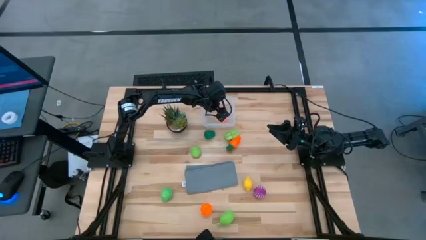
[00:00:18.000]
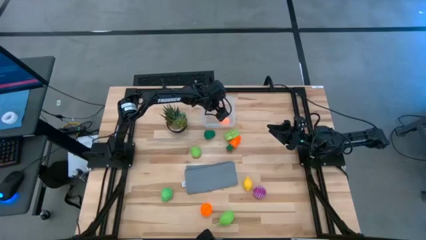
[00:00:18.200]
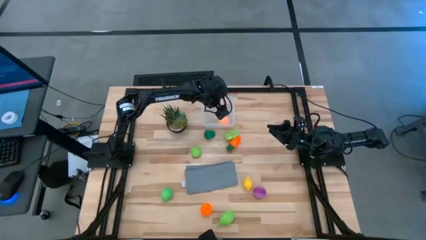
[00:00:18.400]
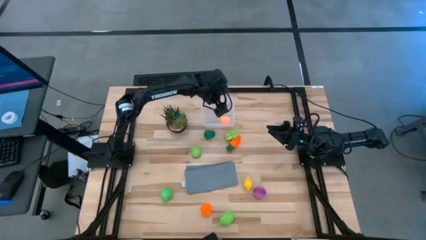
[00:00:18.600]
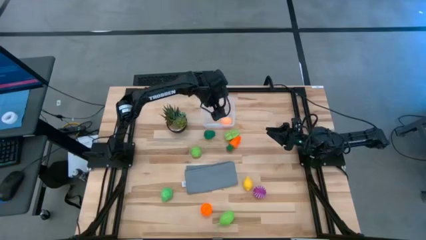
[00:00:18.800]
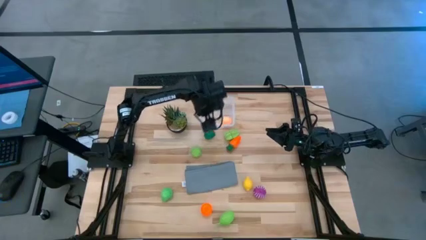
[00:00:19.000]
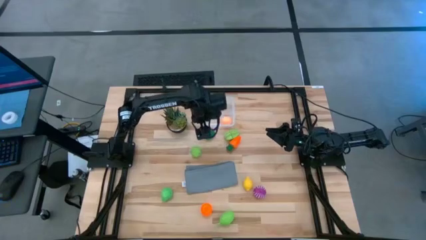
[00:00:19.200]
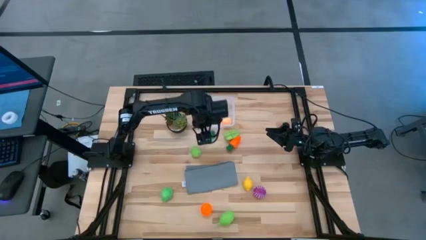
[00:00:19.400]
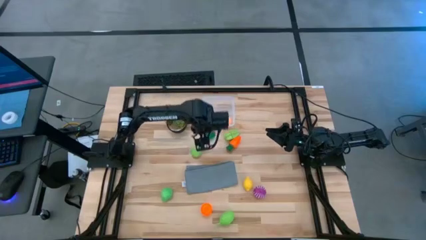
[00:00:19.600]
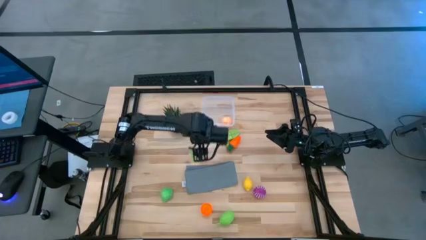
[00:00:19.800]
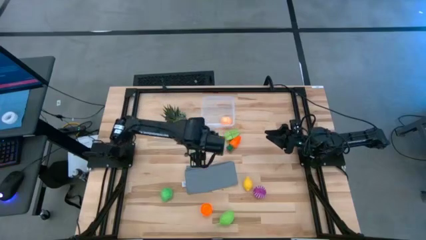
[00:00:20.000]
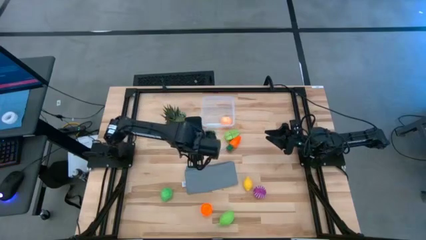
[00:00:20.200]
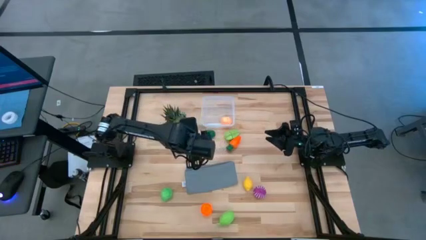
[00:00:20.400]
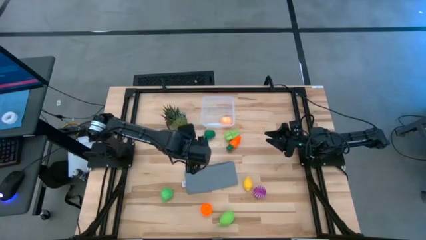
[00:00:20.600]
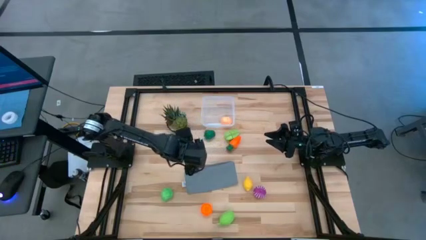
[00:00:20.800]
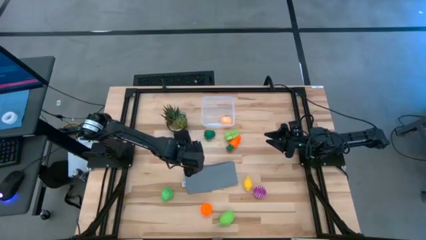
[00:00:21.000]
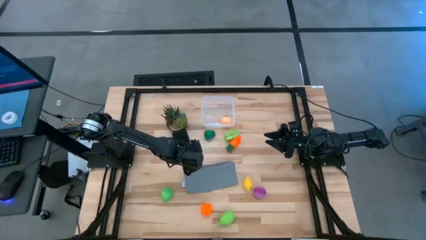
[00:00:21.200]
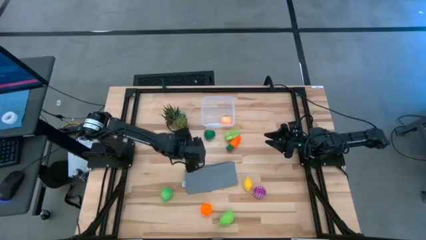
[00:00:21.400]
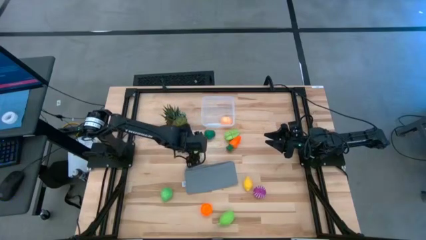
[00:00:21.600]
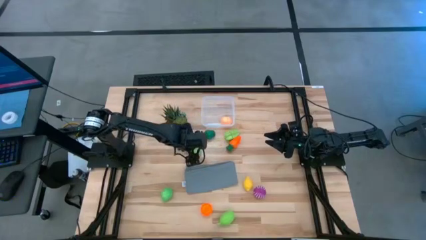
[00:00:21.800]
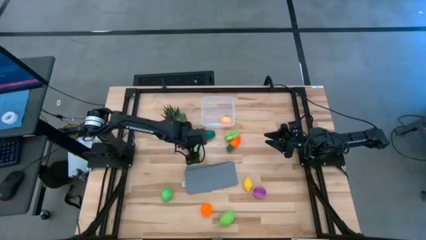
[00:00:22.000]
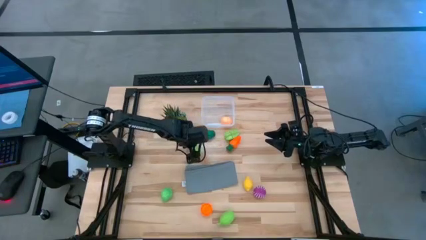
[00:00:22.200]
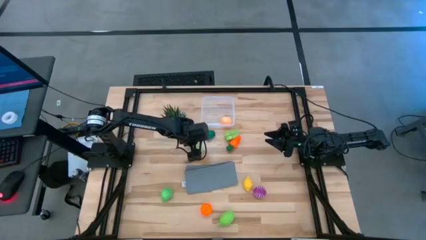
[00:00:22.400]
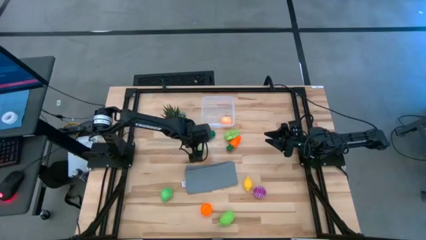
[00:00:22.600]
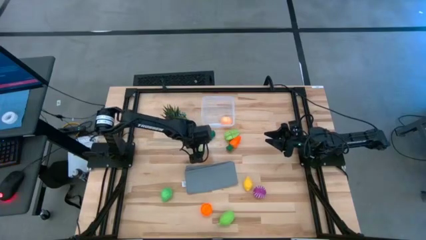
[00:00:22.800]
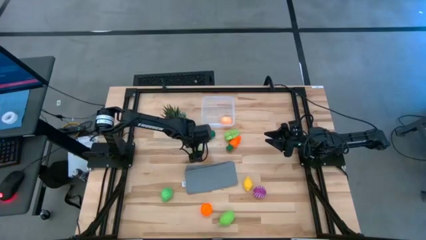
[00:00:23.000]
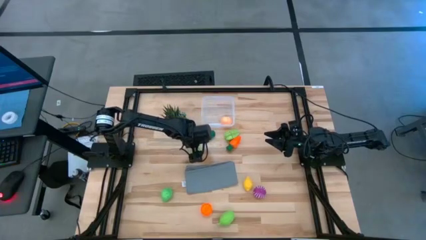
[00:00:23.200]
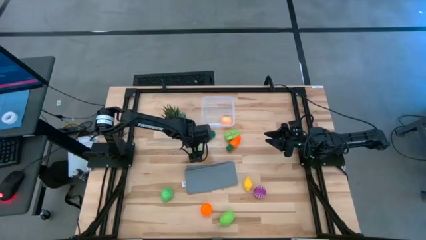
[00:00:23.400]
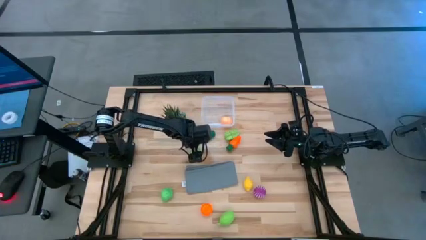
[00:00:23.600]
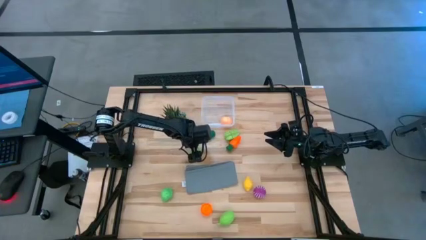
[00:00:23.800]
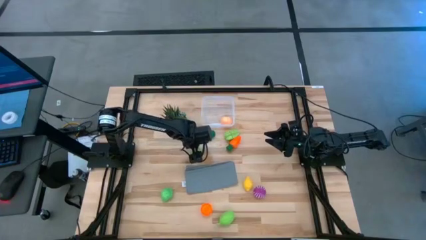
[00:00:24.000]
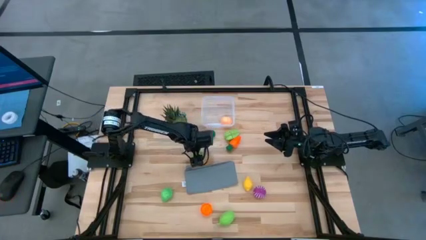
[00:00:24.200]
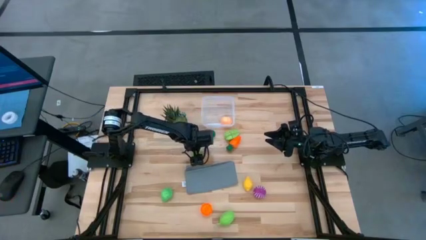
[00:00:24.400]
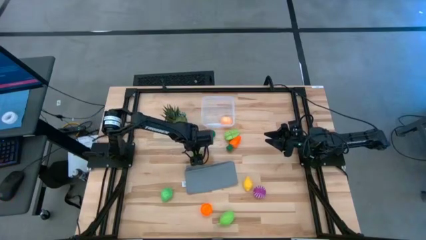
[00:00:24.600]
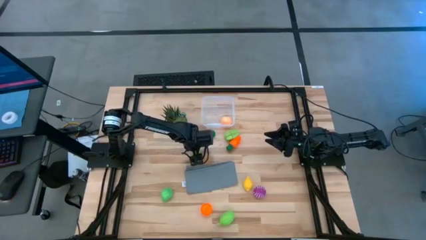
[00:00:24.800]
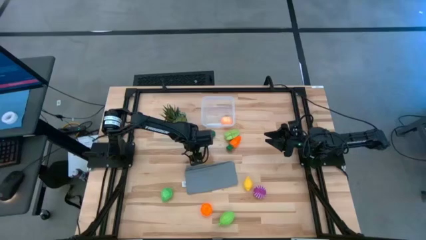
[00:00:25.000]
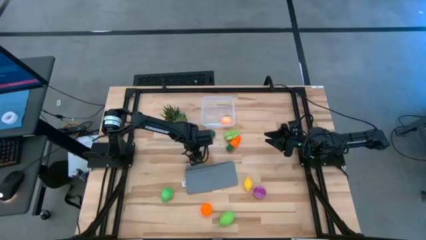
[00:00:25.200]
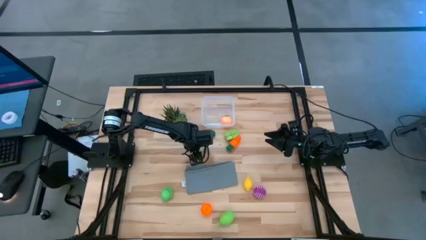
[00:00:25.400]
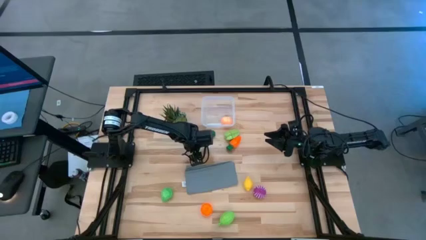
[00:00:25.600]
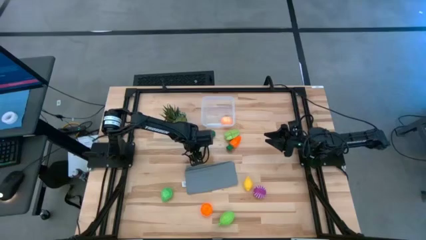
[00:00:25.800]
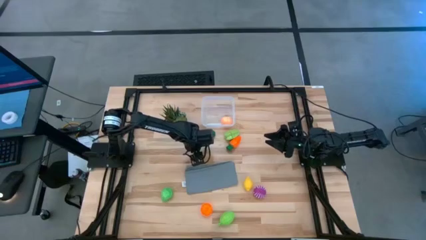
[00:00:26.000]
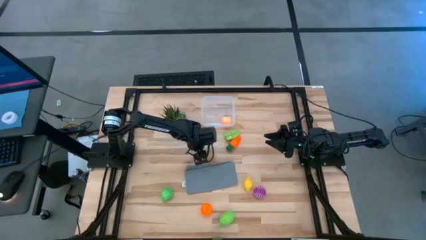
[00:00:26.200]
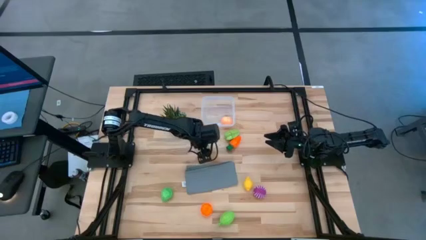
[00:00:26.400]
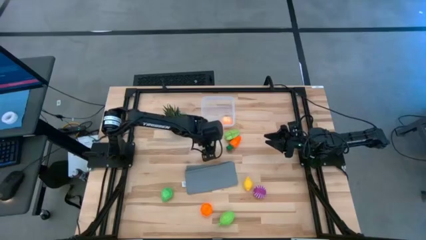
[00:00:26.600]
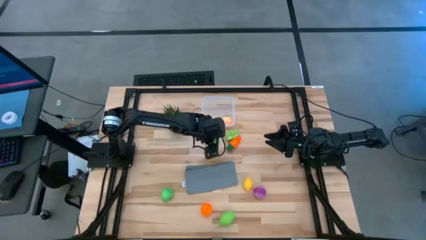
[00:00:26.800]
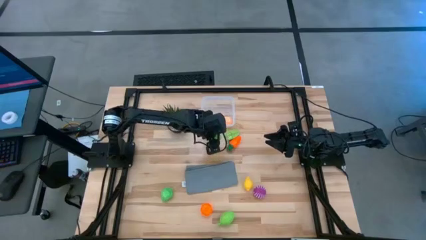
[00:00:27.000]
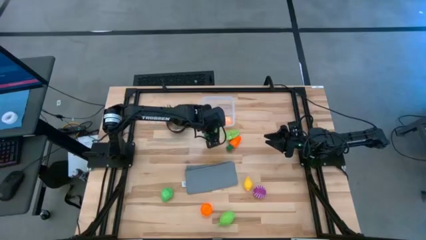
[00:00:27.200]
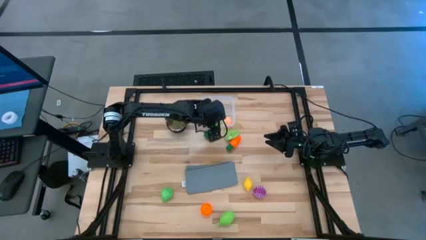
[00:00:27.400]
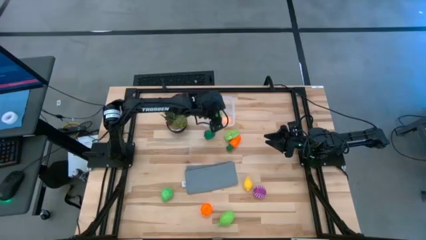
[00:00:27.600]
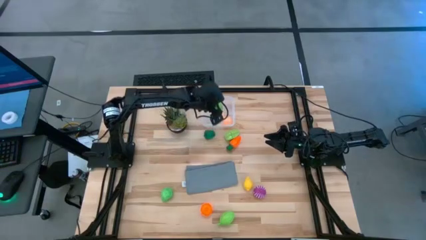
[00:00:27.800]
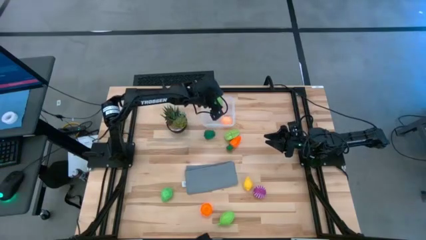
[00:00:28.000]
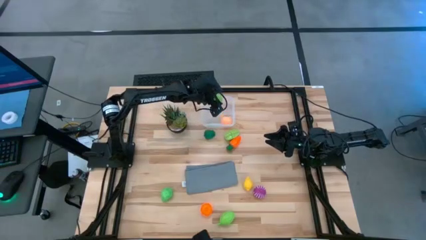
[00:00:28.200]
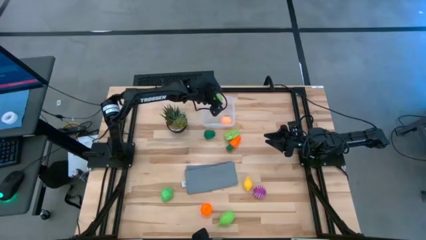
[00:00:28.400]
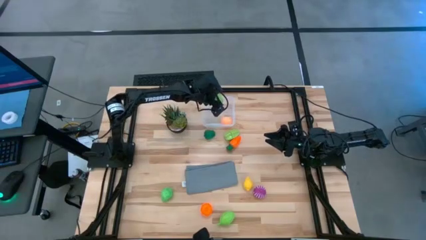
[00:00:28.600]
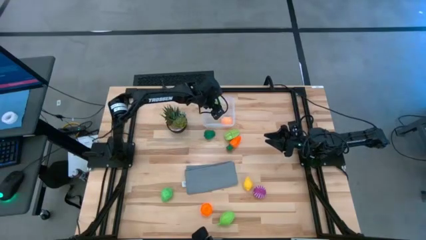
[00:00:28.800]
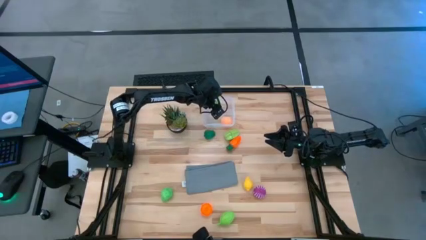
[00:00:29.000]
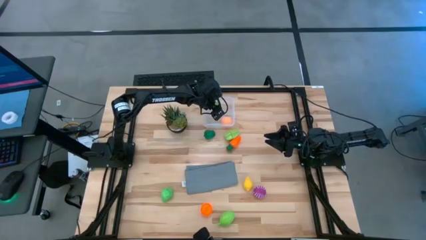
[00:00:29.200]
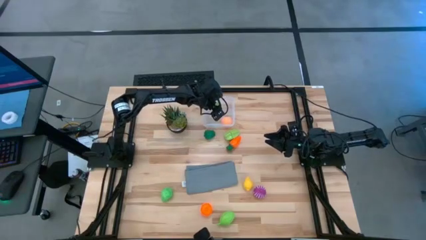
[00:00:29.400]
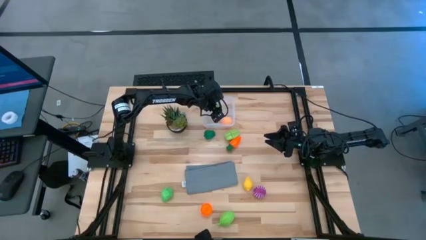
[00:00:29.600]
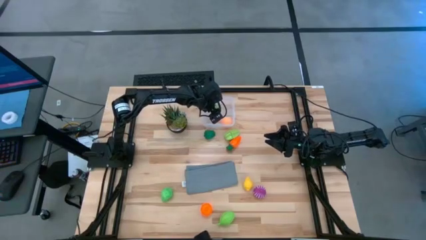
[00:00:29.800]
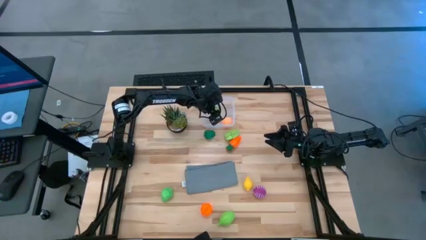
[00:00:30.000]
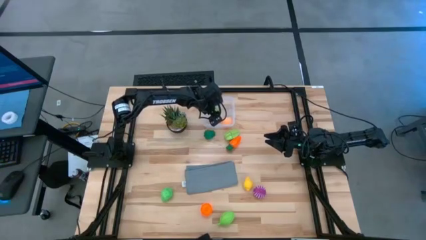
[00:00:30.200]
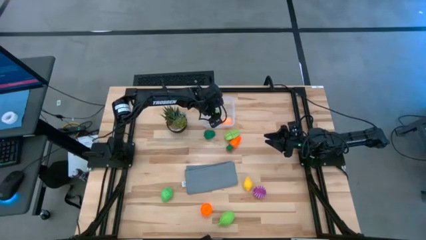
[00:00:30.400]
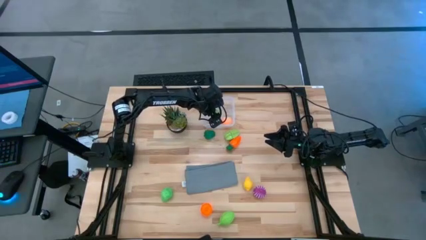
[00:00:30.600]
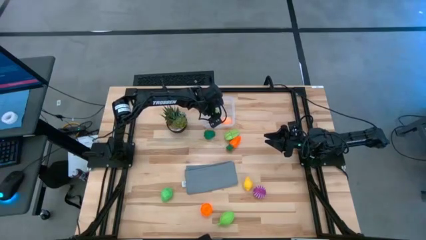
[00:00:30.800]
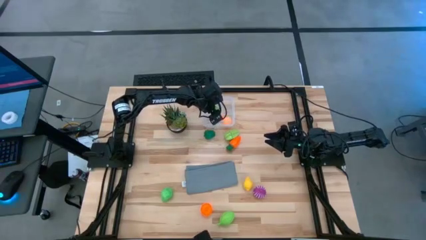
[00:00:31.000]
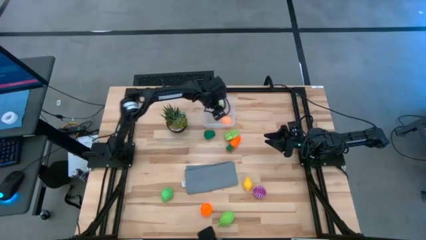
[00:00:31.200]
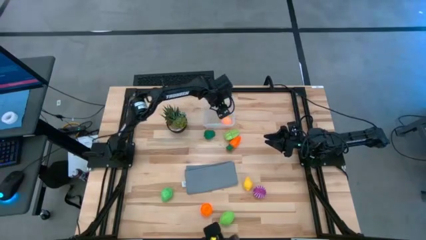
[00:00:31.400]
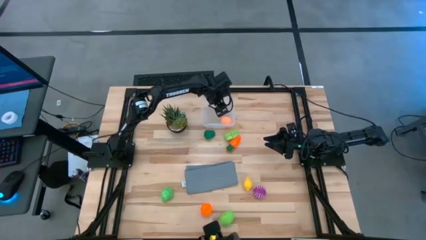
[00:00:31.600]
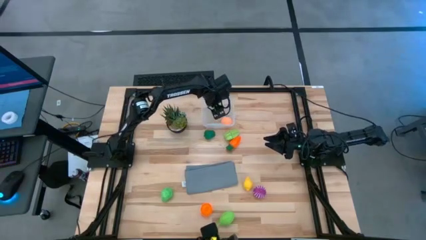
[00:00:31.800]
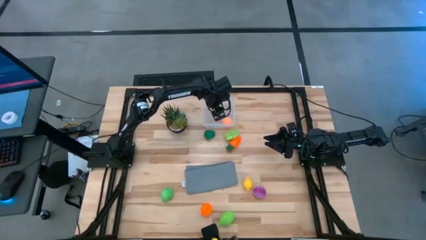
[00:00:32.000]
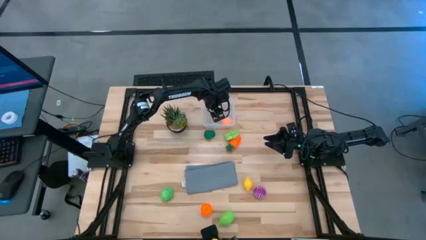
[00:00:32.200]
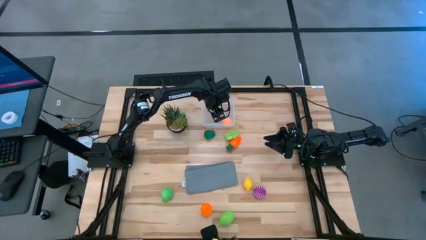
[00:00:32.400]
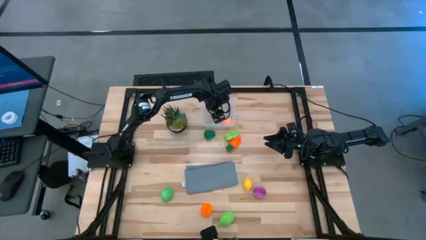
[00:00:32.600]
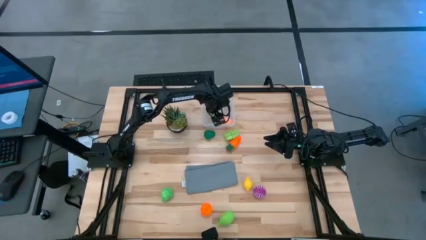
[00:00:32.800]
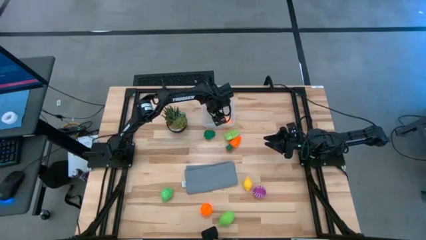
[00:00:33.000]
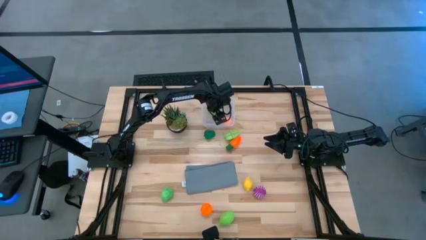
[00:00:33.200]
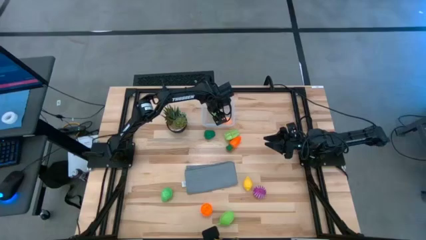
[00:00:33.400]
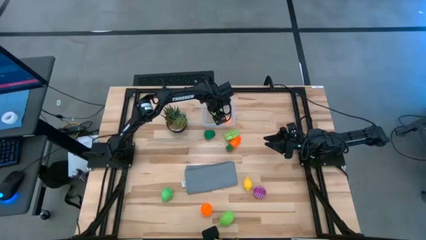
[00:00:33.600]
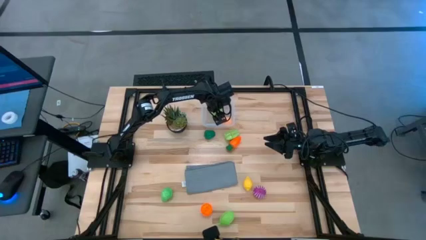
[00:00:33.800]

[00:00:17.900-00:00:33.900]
Task: Pick and placing Produce into tupperware
Put the cabbage into the bin
